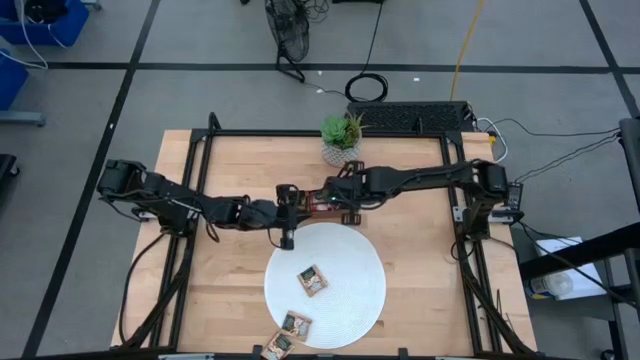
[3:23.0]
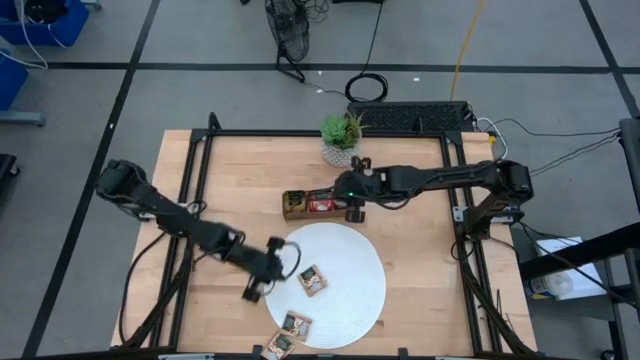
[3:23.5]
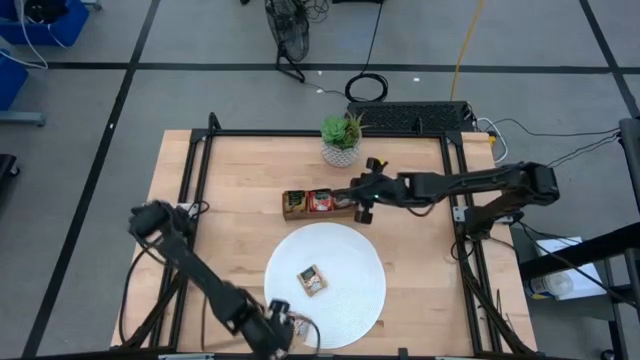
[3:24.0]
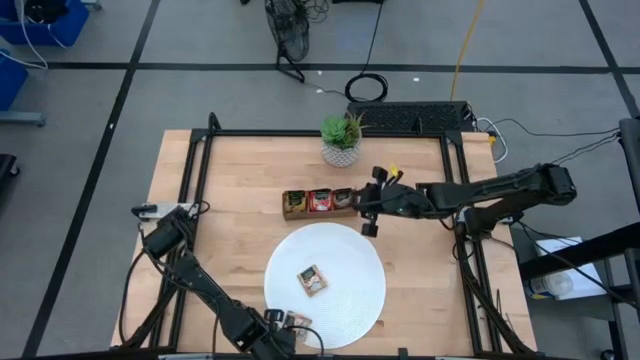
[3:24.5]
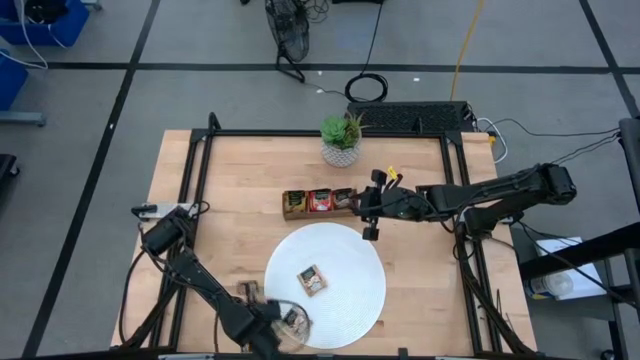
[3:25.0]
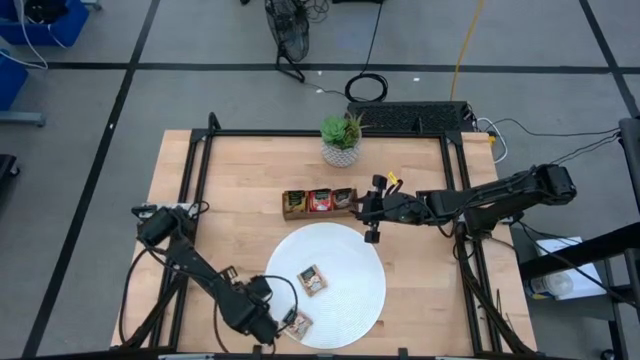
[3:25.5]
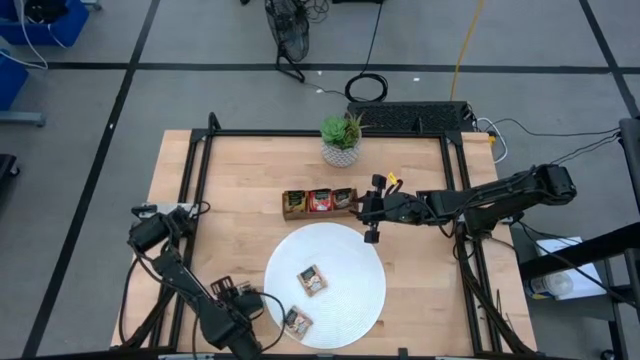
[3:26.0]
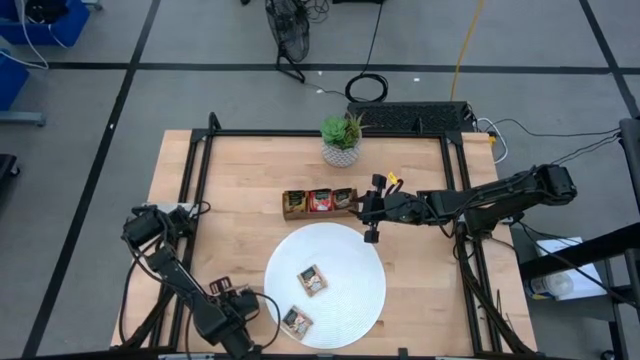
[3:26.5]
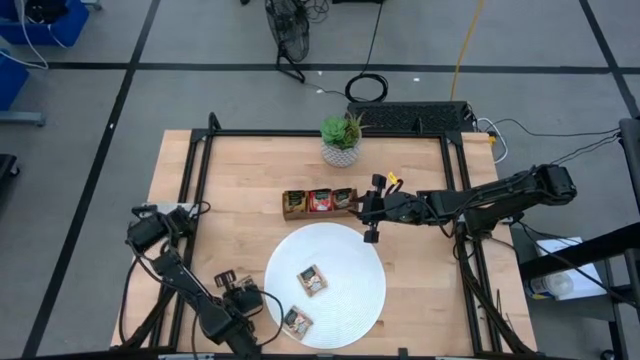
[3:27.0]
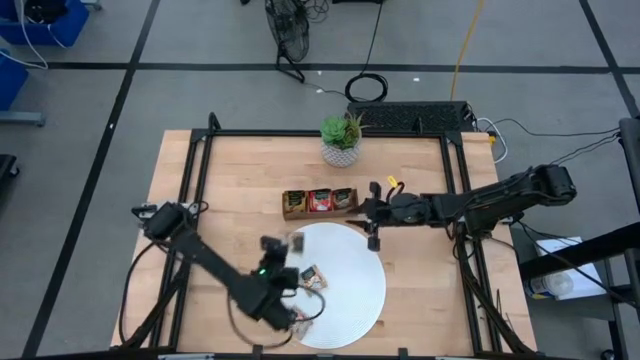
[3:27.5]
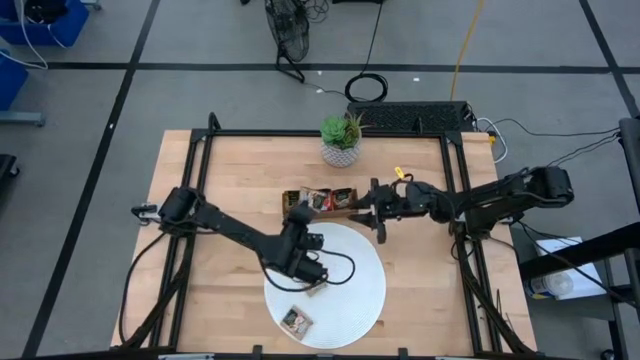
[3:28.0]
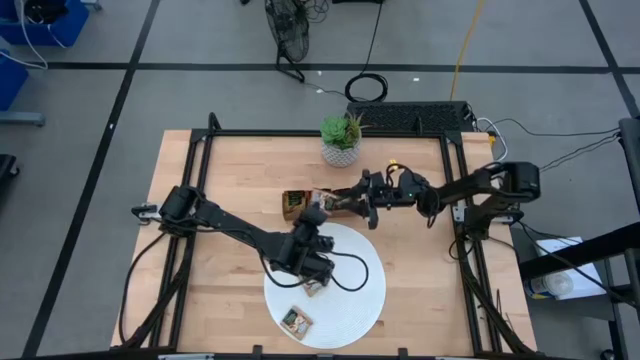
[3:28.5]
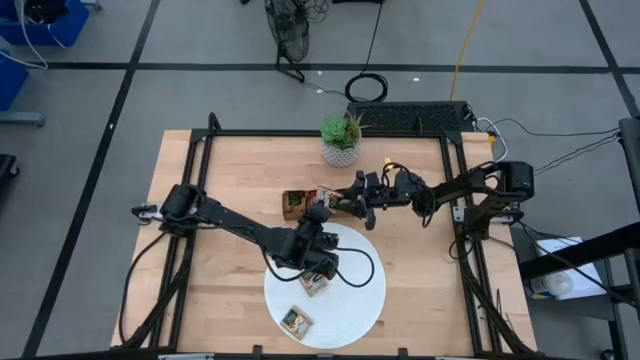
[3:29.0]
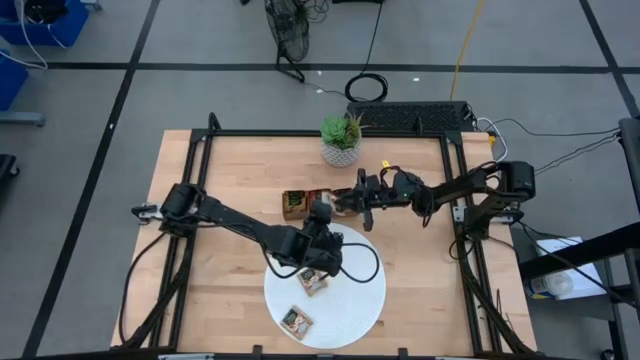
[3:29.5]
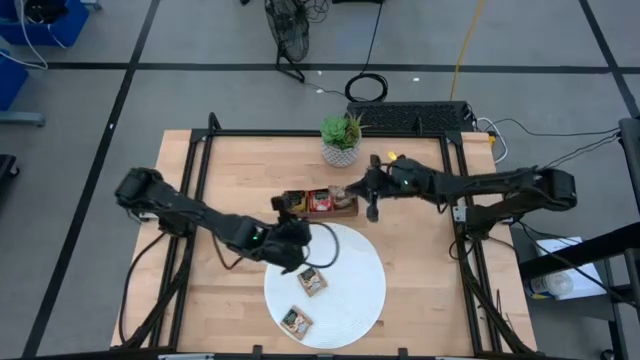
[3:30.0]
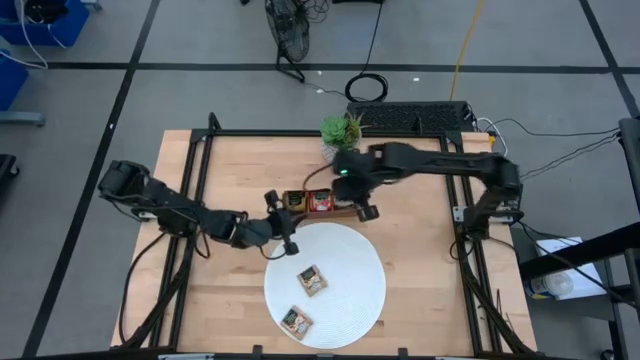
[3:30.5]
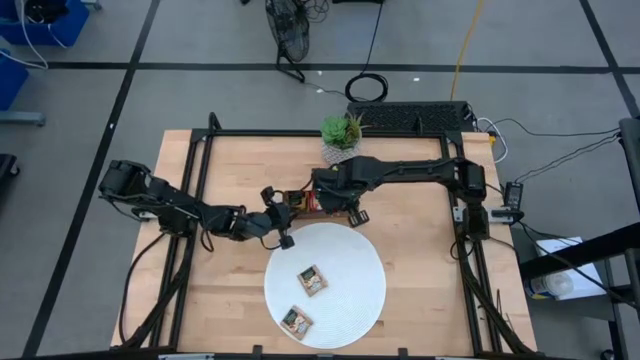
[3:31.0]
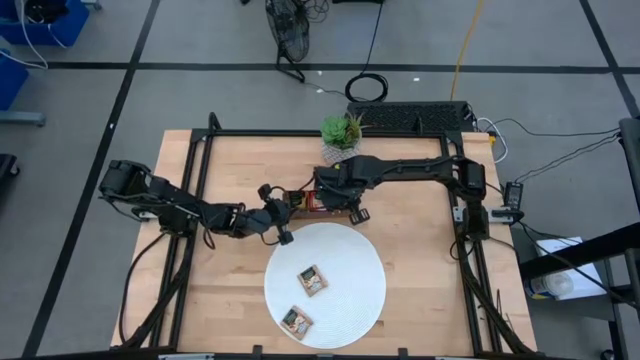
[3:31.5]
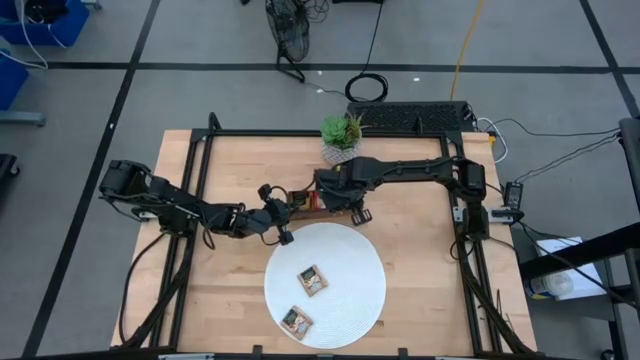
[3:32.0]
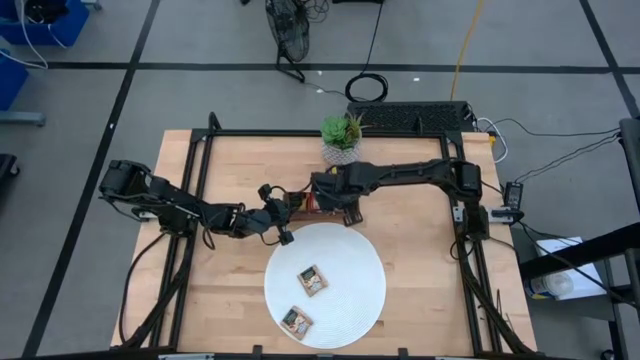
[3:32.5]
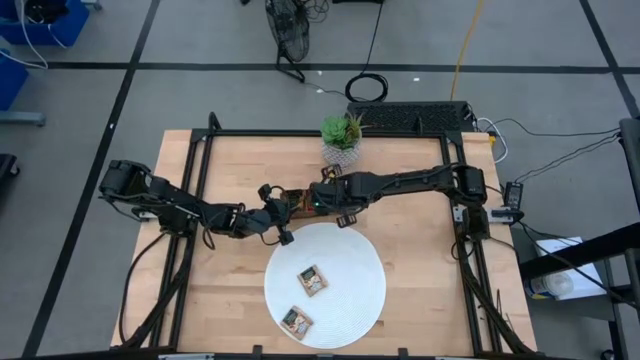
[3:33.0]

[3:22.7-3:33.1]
Task: Pick & Place Tea
Put the vanilla tea bag into the wooden organizer

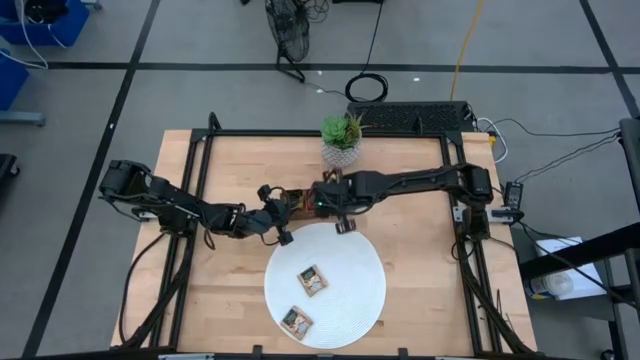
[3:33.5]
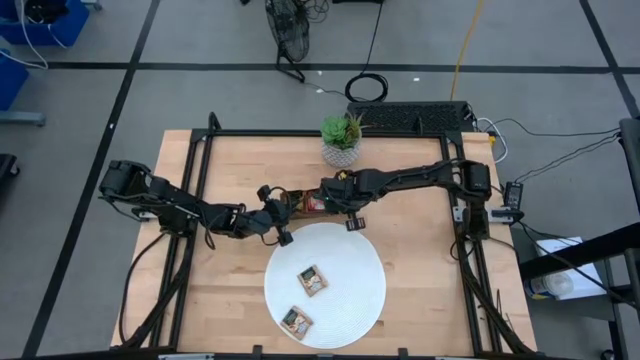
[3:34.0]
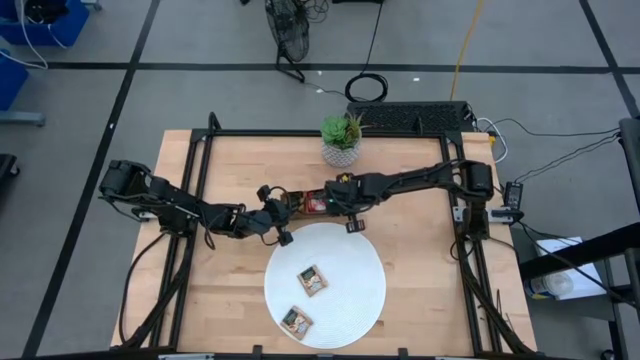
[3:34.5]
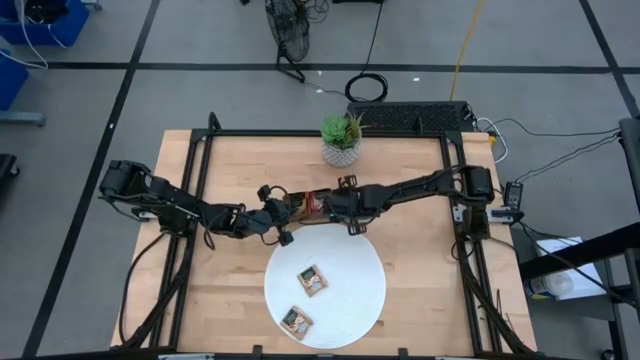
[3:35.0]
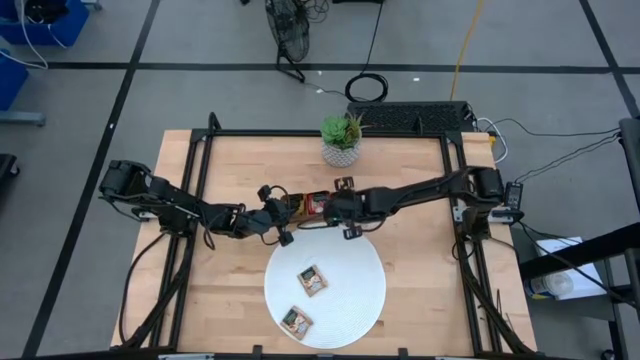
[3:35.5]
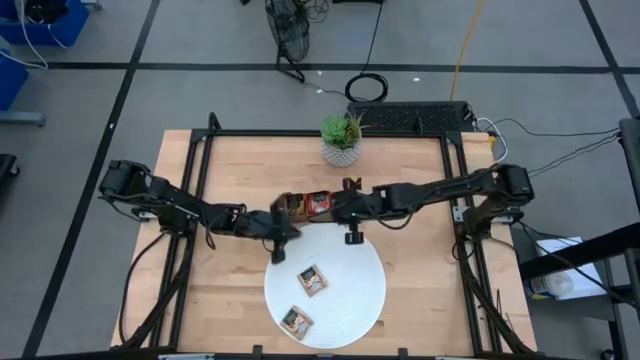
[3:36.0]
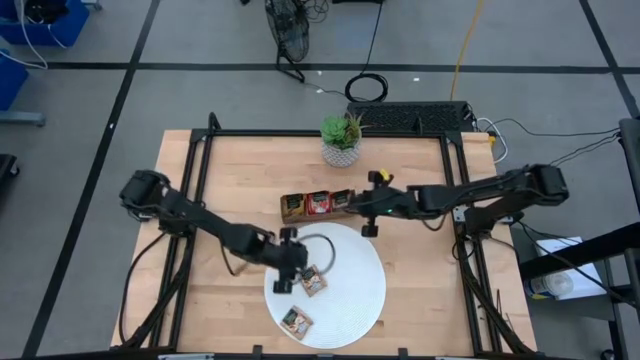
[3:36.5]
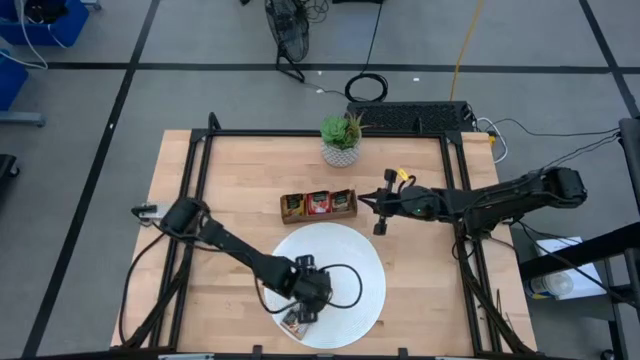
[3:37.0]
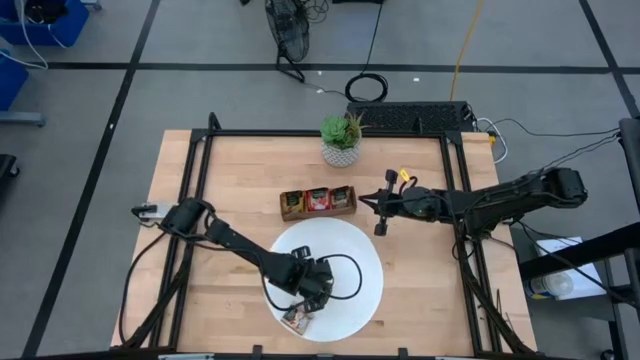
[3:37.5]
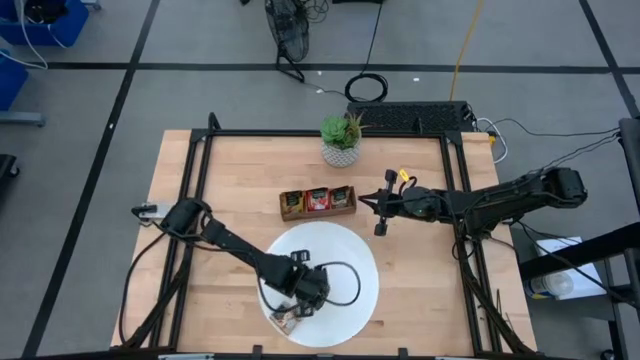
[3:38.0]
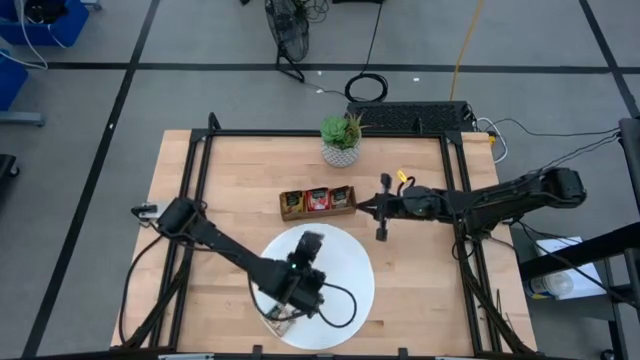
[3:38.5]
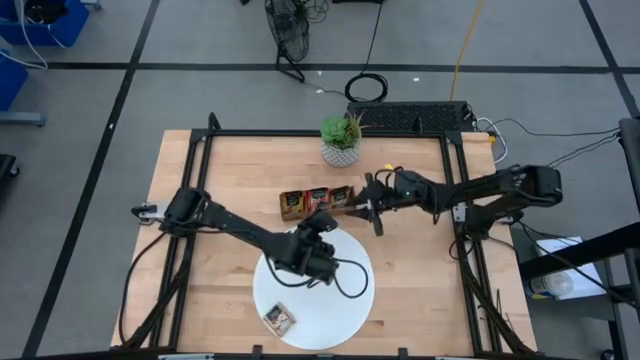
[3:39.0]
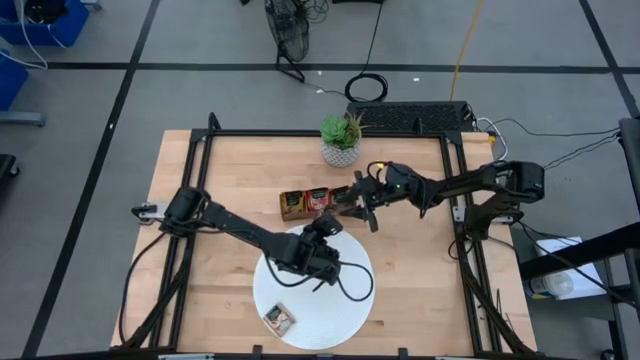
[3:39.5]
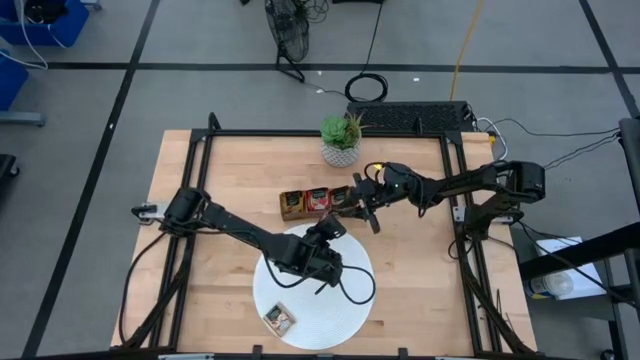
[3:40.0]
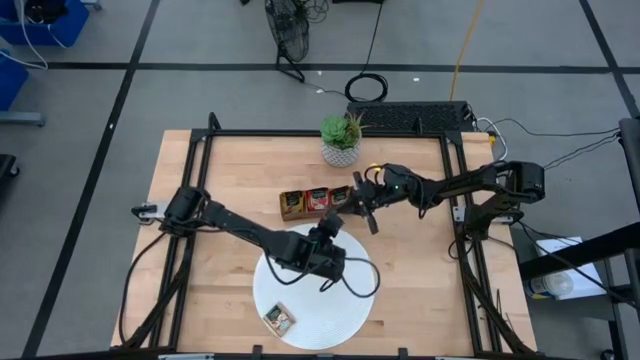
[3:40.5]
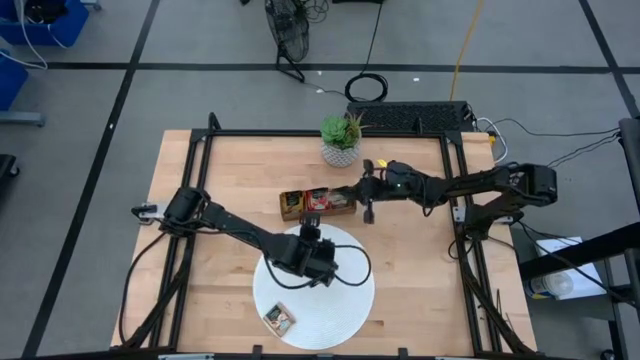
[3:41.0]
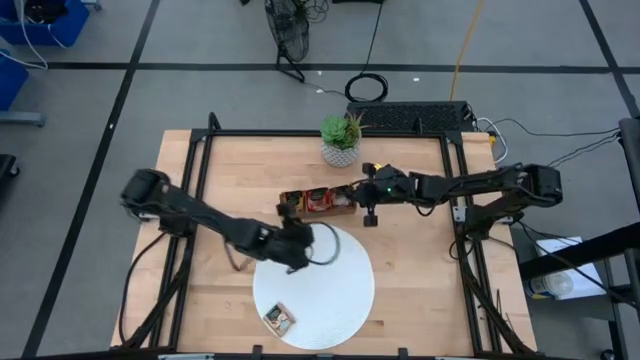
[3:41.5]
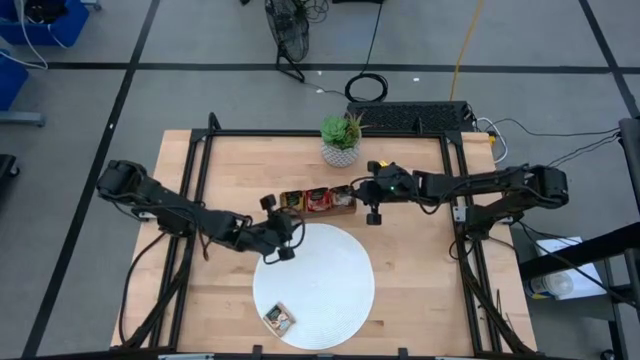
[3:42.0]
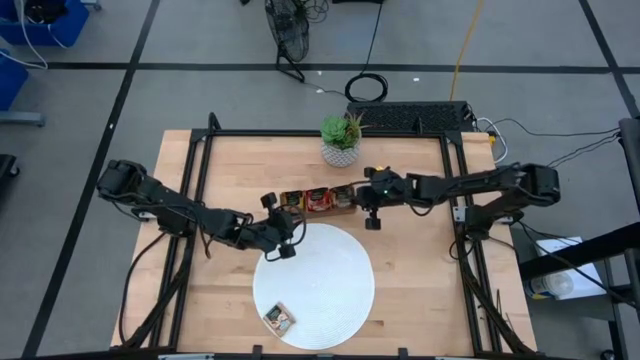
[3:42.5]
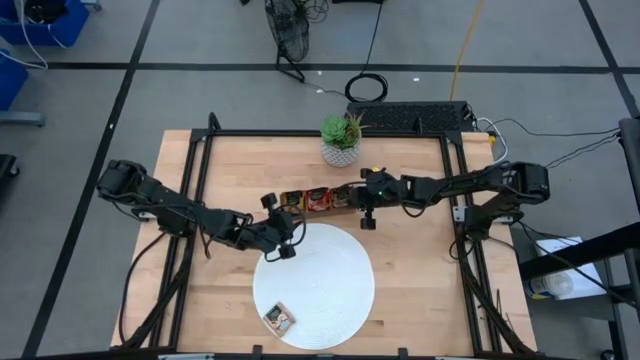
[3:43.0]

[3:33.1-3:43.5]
Put the vanilla tea bag into the wooden organizer
